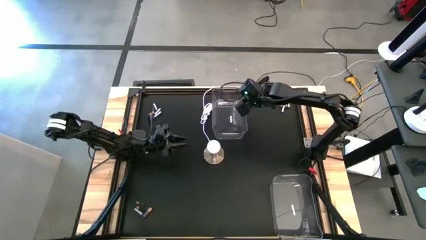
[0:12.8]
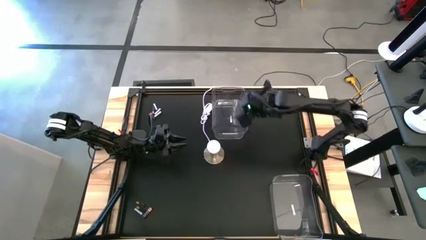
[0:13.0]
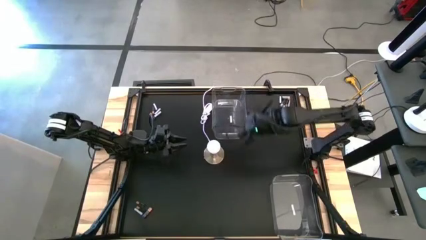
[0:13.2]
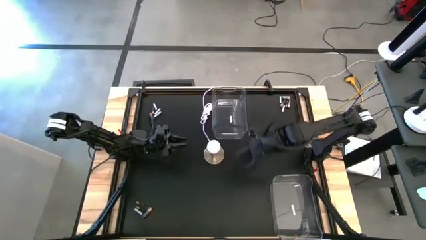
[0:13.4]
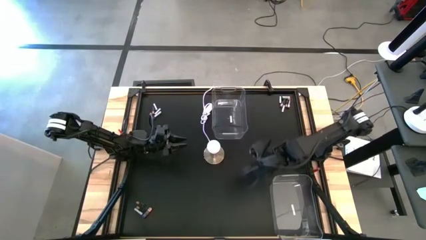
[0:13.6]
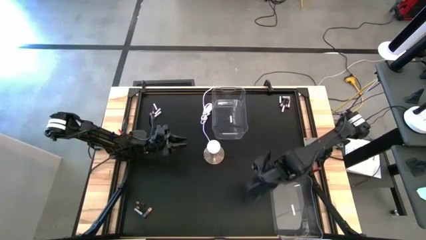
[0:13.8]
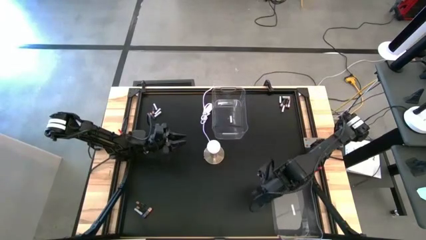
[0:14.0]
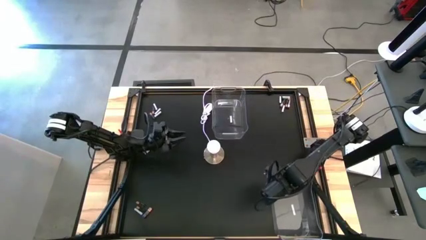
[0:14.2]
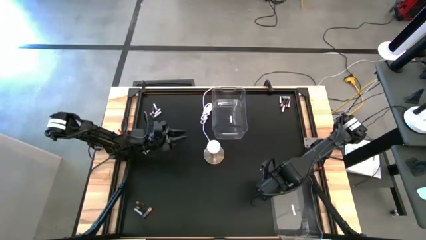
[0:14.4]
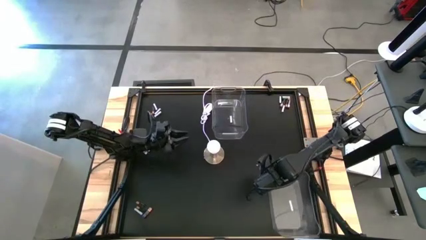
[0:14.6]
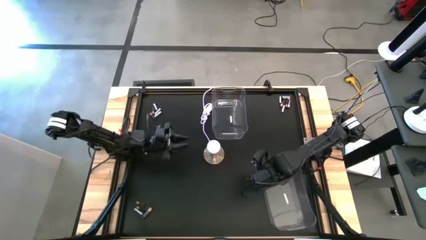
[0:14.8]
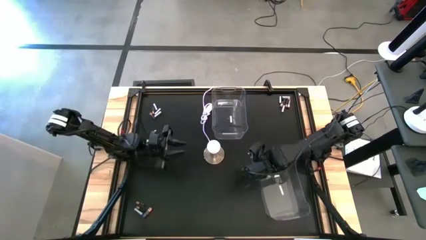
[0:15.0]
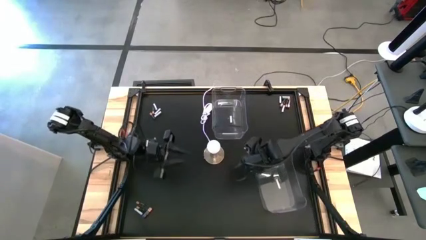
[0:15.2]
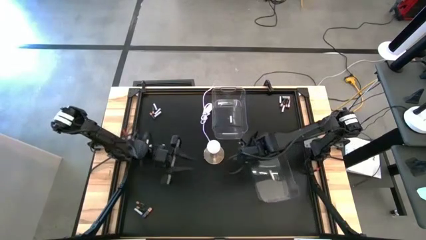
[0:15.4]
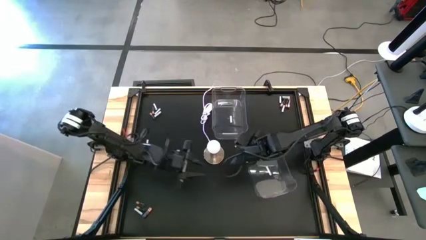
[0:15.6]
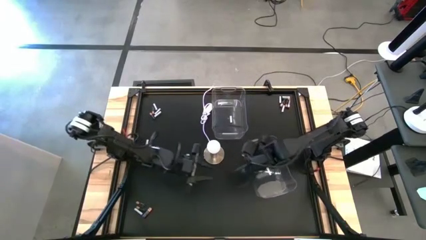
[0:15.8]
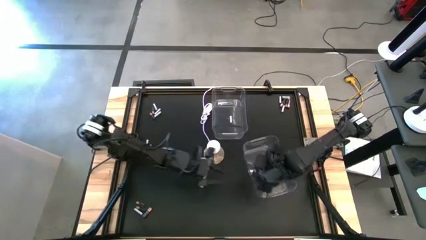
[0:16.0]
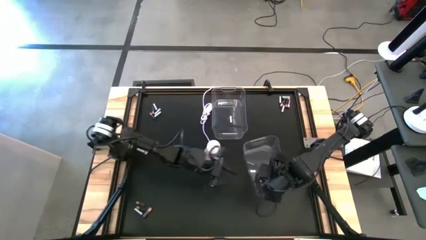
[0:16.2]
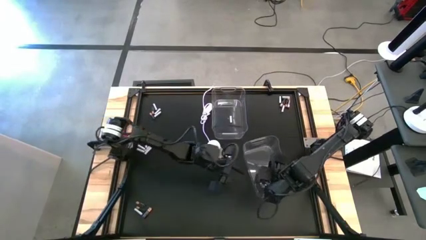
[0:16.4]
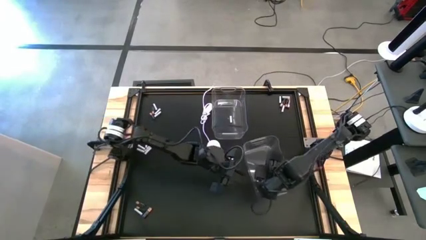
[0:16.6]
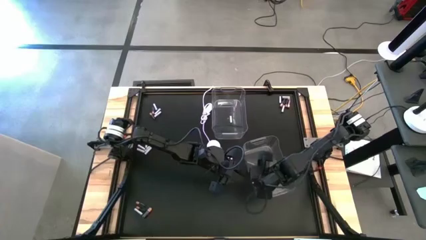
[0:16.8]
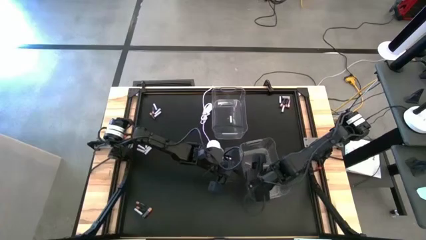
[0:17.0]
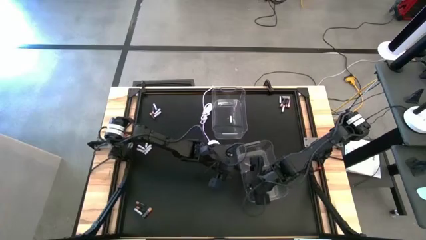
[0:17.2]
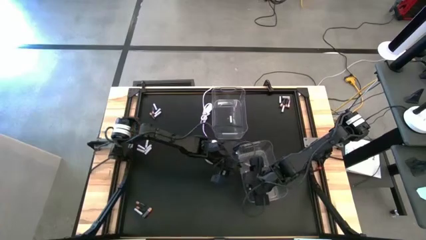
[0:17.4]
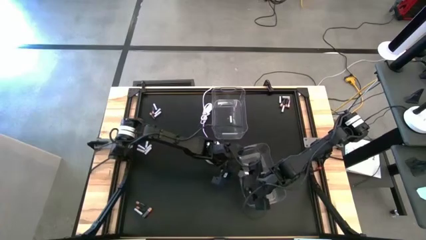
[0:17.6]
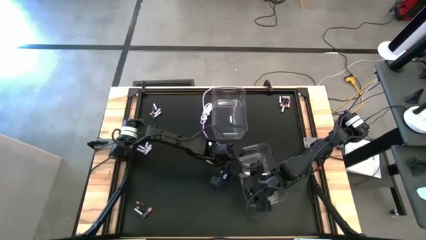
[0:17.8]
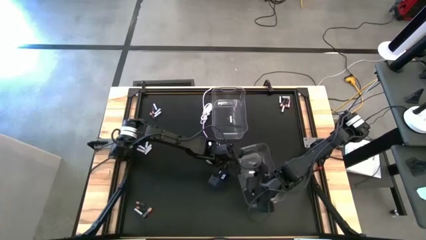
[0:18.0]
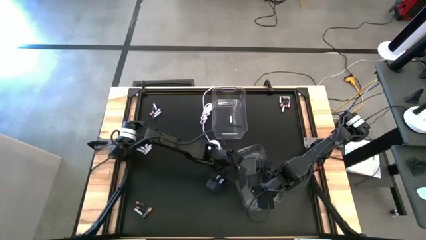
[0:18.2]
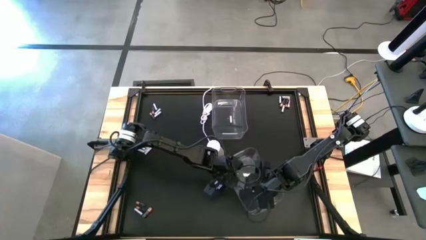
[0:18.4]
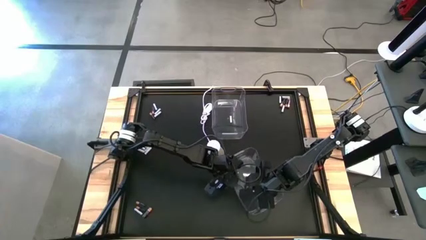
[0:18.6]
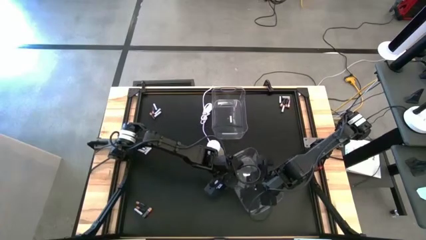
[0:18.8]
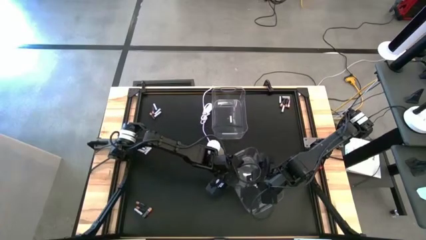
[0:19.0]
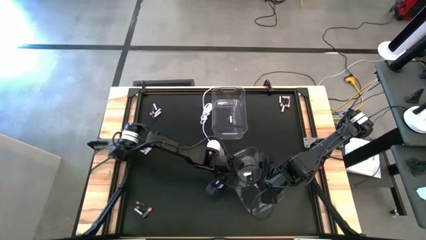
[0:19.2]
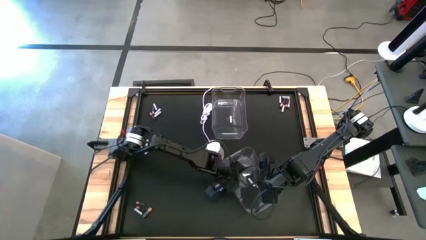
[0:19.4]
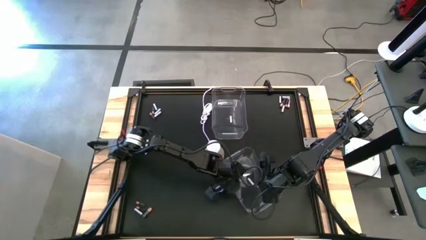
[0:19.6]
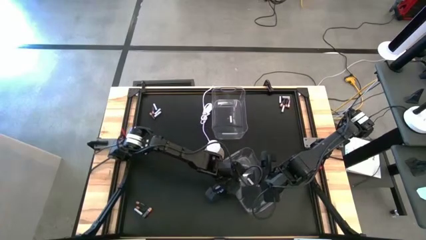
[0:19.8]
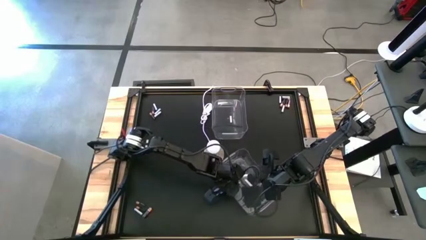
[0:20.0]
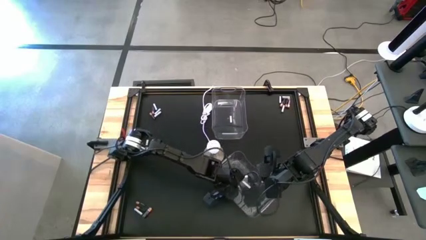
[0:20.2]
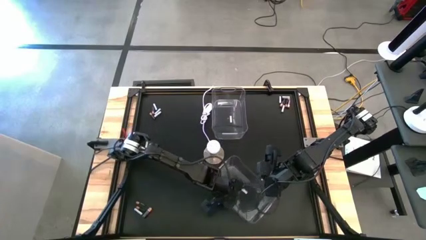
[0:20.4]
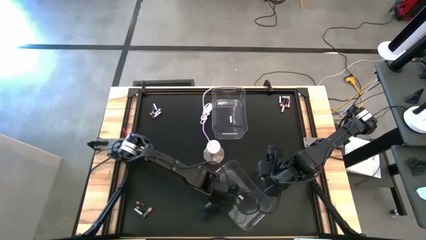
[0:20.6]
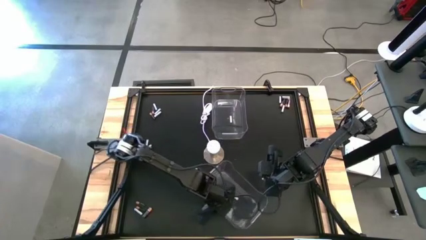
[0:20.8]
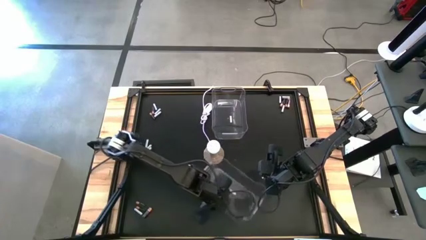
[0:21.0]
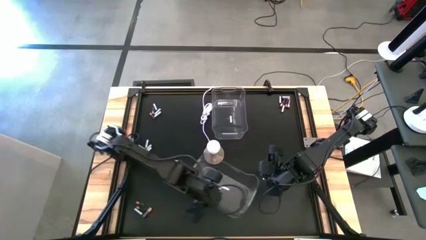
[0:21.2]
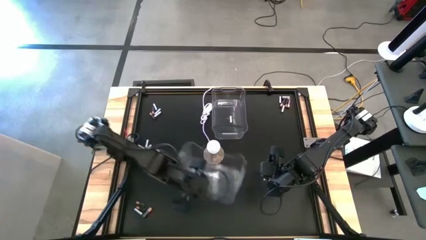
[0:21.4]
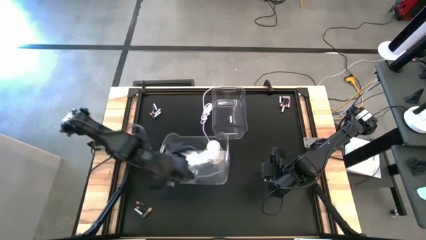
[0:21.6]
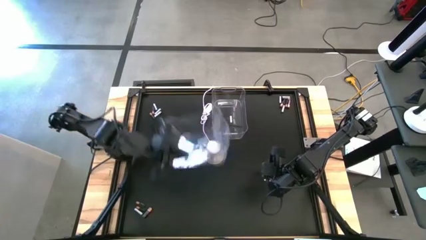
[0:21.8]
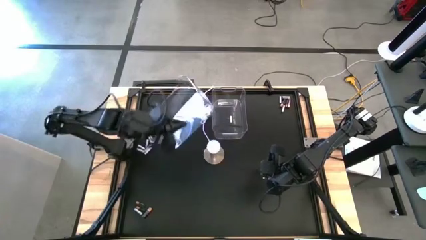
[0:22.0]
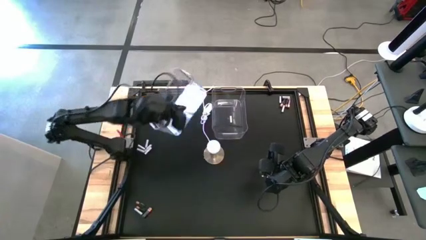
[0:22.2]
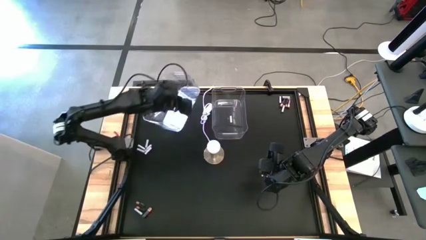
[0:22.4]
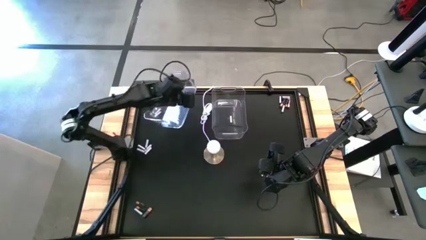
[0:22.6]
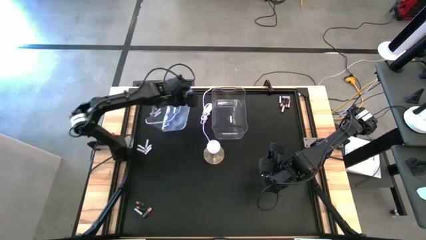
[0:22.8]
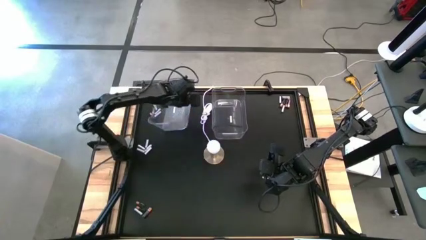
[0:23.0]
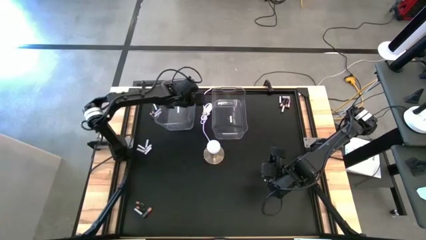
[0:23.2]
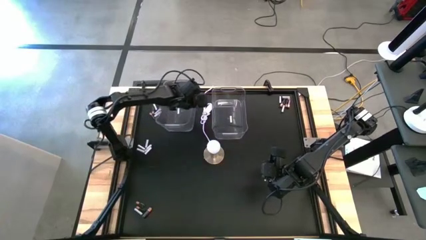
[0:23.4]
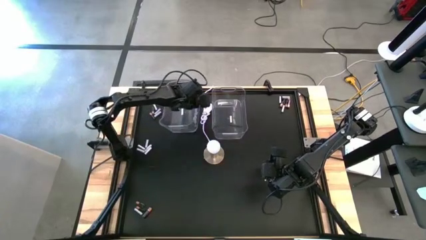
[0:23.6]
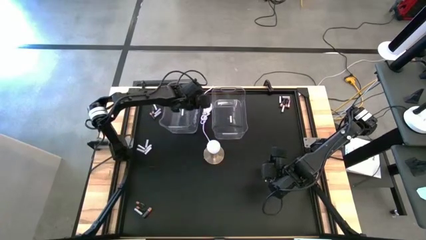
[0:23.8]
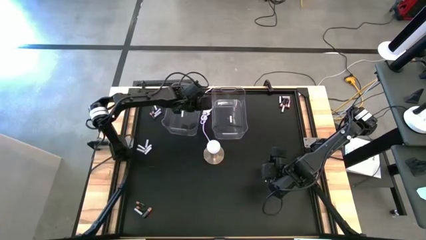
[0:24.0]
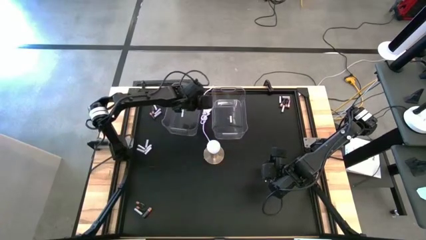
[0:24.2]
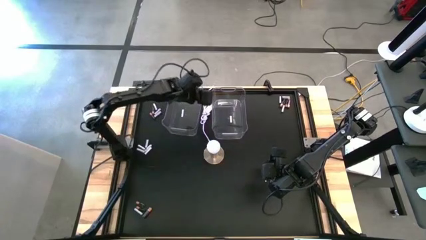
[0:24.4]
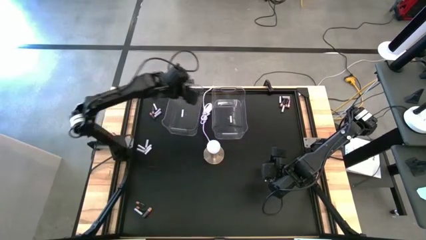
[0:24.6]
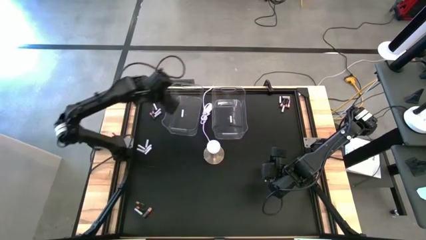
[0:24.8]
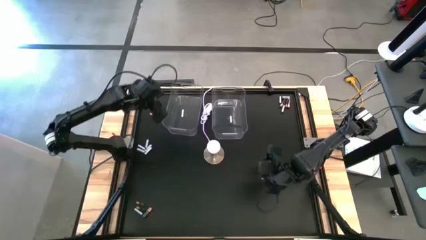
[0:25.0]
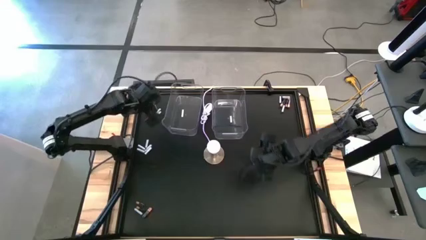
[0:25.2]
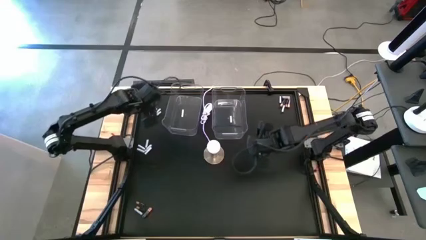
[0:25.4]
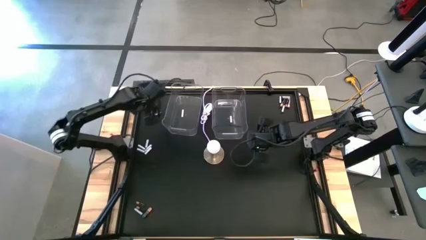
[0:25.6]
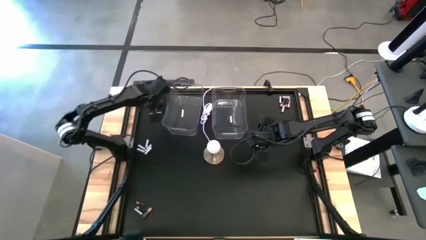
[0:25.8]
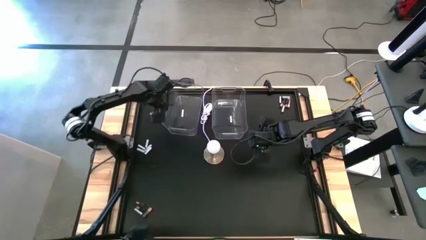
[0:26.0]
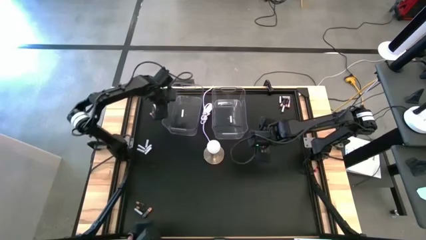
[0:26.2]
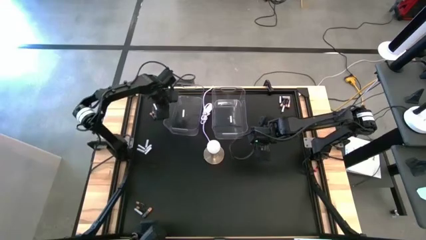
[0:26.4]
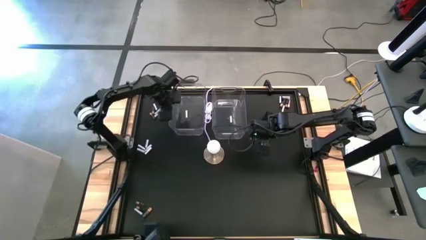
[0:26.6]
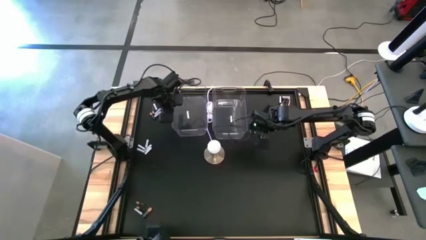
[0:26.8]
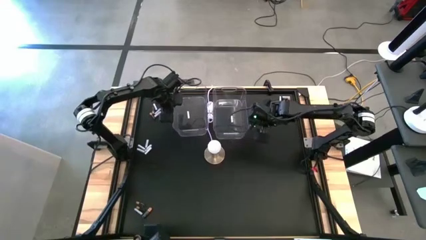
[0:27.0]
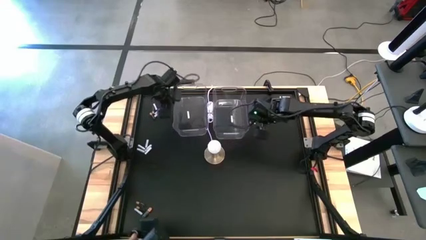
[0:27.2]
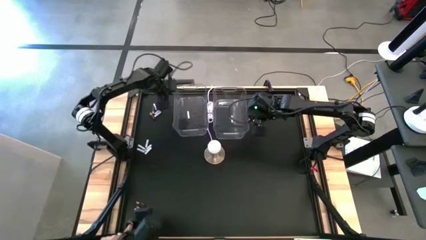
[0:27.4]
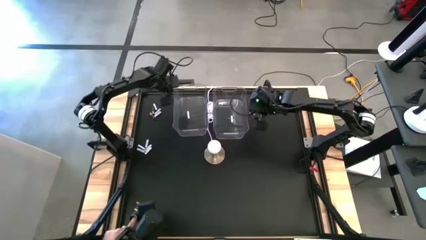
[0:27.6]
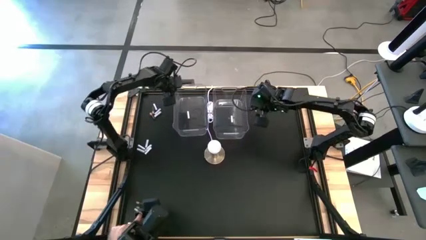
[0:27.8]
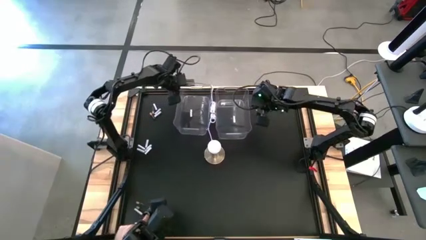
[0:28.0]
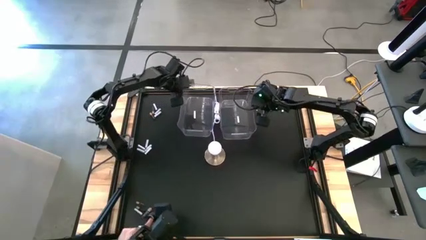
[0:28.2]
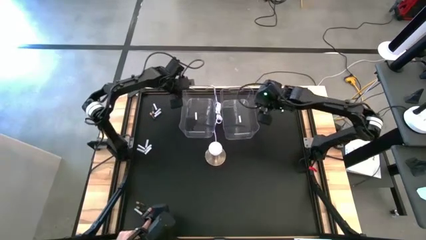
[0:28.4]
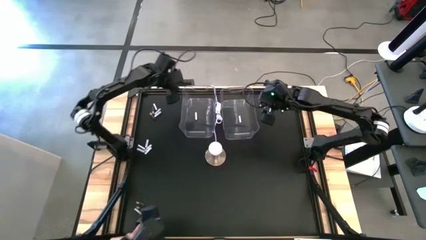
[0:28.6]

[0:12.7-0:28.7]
Task: Sort batteries
Move the bottom transparent bin to the middle
